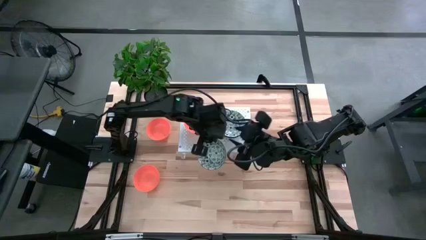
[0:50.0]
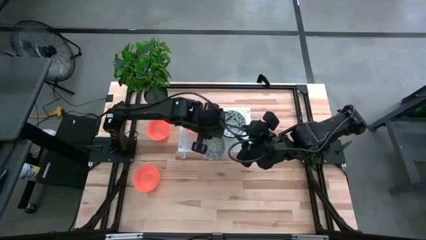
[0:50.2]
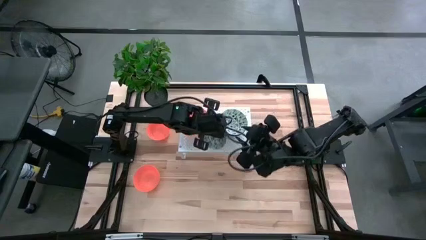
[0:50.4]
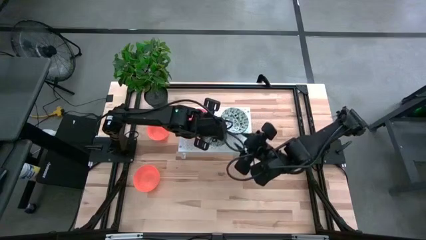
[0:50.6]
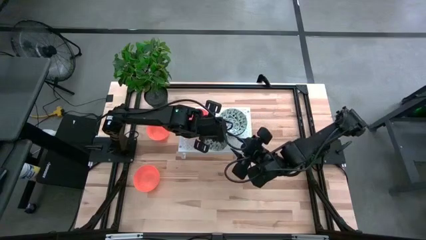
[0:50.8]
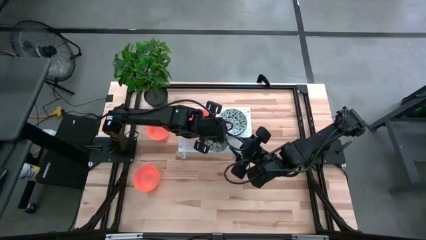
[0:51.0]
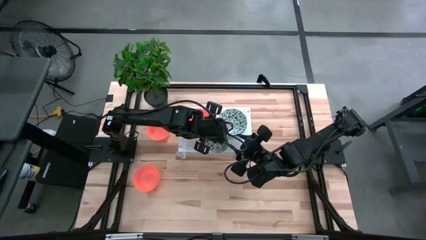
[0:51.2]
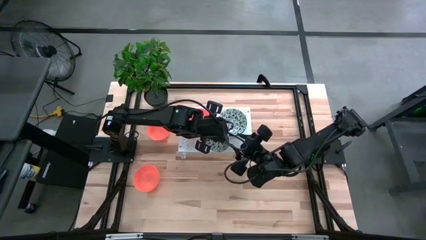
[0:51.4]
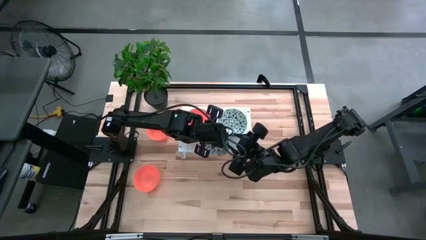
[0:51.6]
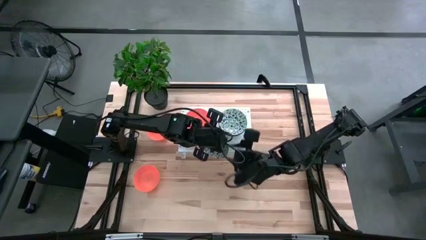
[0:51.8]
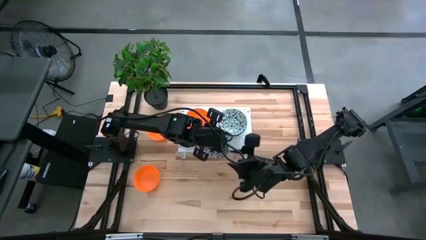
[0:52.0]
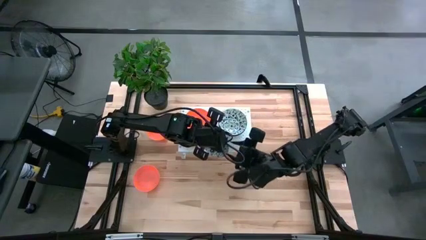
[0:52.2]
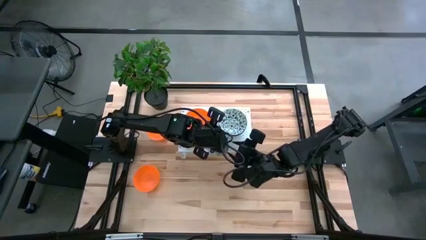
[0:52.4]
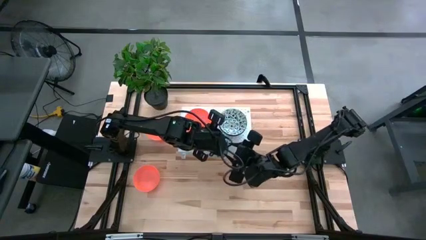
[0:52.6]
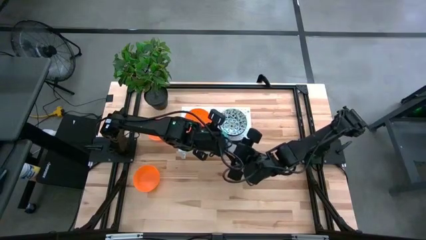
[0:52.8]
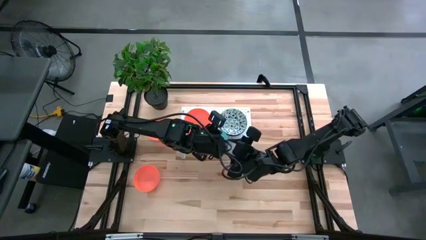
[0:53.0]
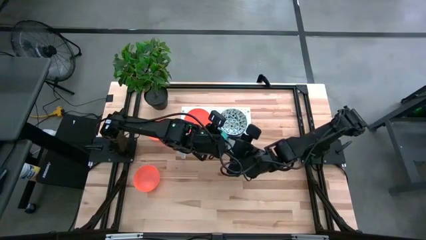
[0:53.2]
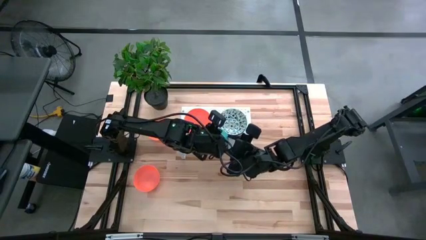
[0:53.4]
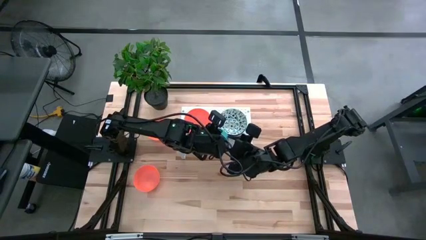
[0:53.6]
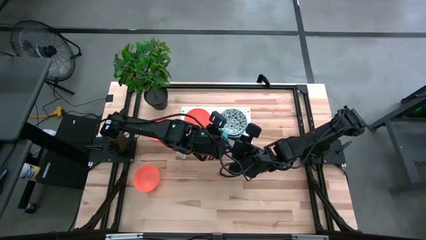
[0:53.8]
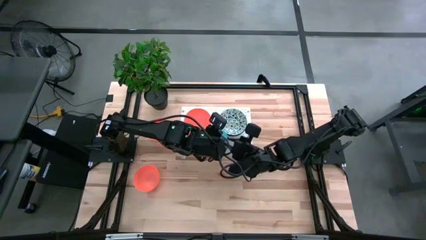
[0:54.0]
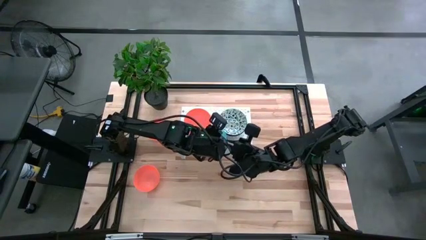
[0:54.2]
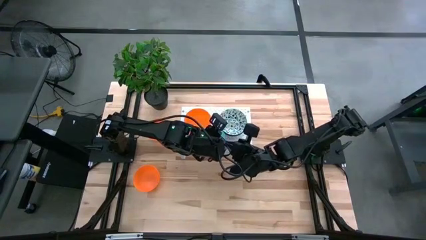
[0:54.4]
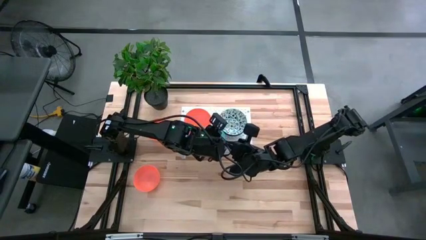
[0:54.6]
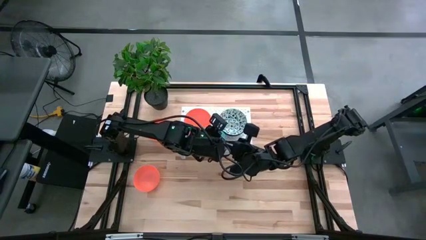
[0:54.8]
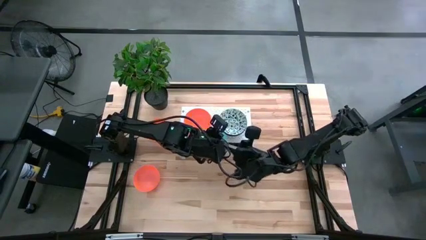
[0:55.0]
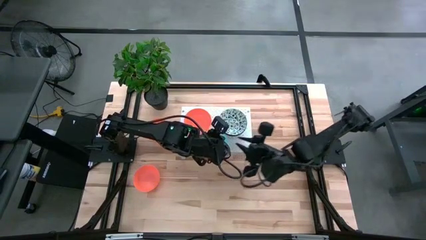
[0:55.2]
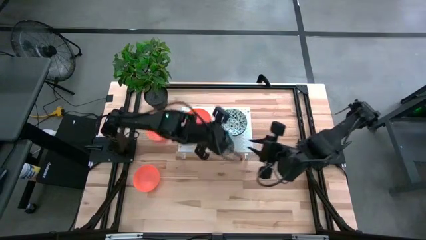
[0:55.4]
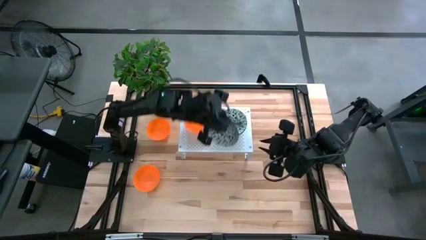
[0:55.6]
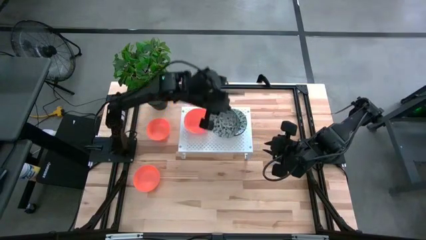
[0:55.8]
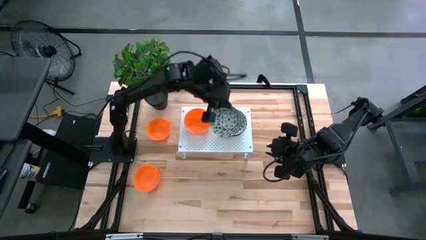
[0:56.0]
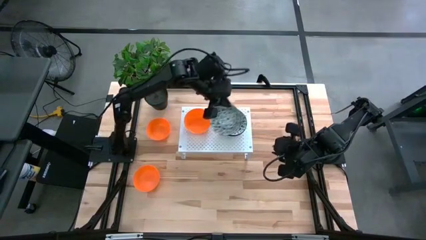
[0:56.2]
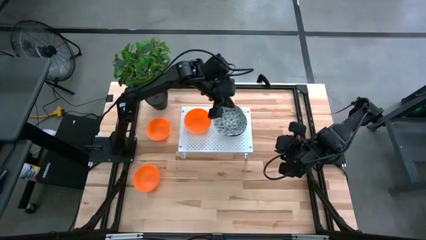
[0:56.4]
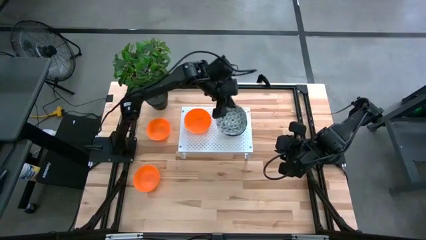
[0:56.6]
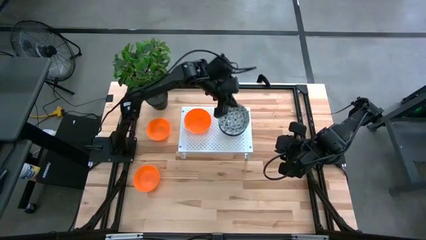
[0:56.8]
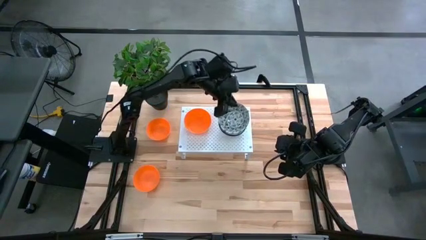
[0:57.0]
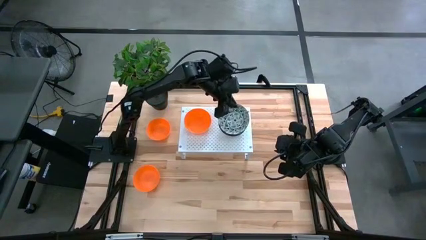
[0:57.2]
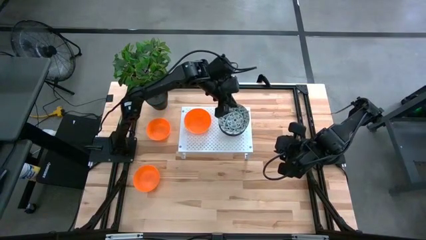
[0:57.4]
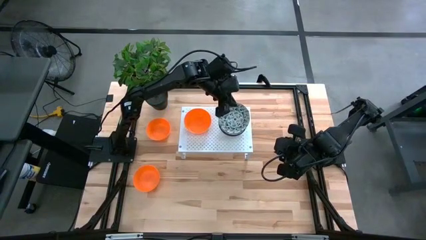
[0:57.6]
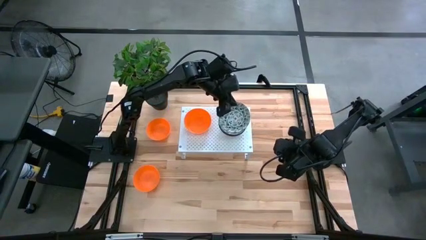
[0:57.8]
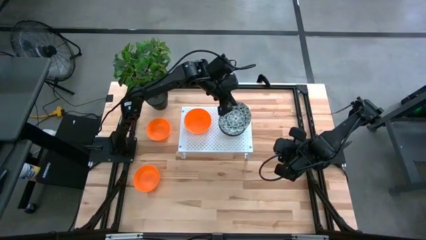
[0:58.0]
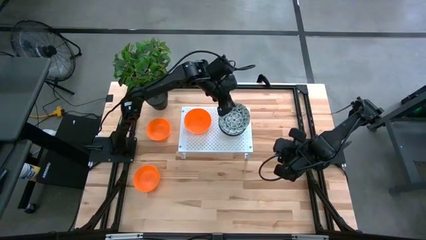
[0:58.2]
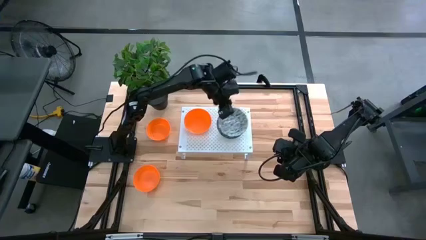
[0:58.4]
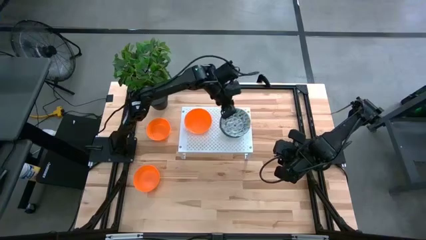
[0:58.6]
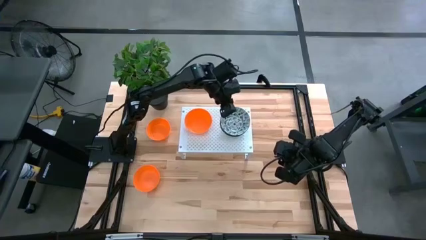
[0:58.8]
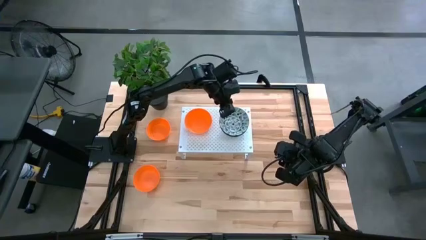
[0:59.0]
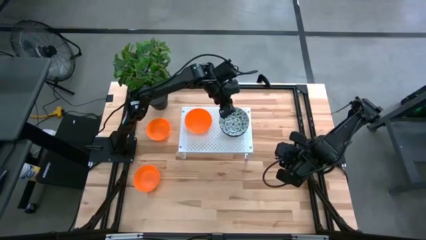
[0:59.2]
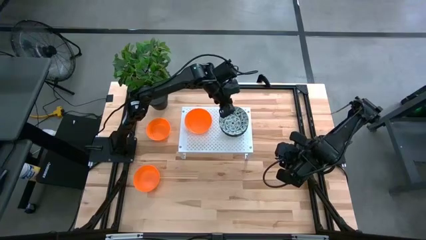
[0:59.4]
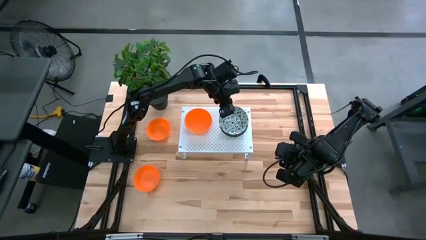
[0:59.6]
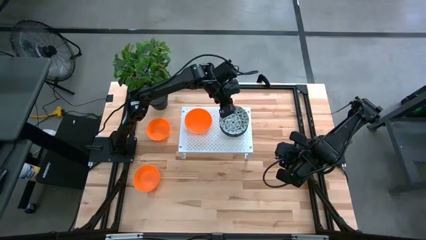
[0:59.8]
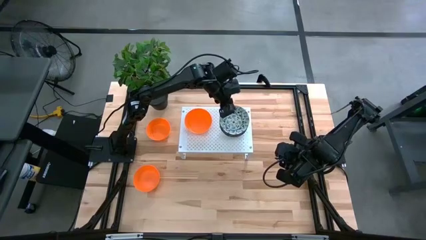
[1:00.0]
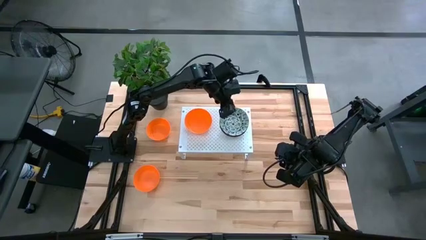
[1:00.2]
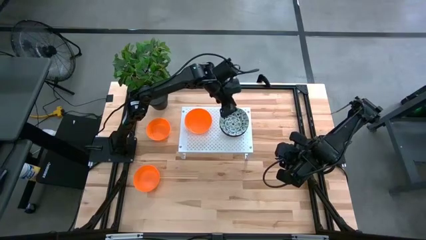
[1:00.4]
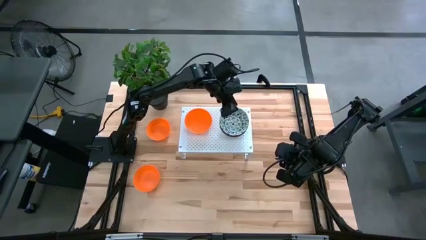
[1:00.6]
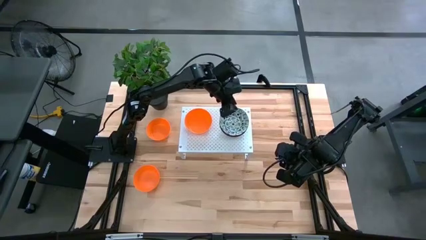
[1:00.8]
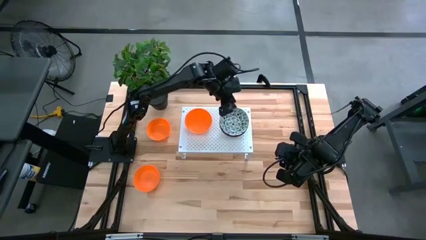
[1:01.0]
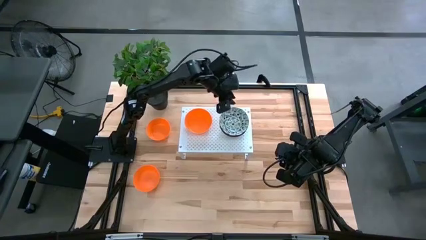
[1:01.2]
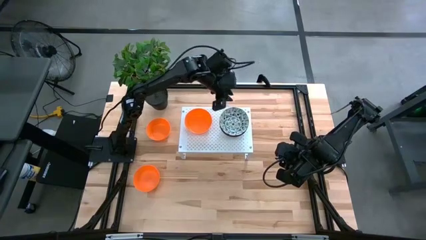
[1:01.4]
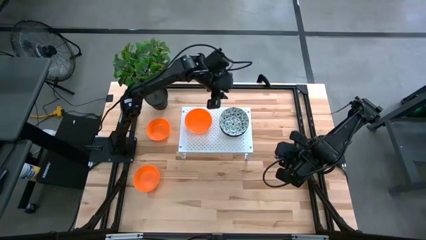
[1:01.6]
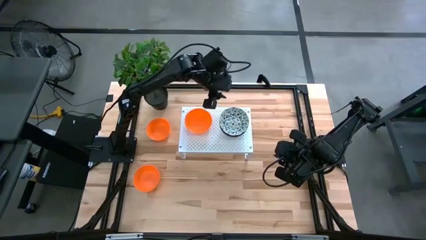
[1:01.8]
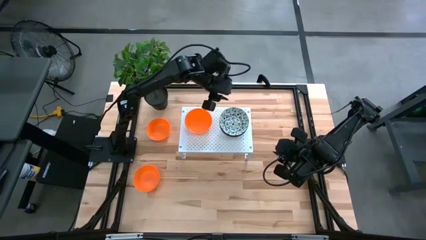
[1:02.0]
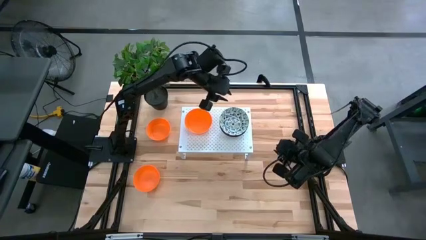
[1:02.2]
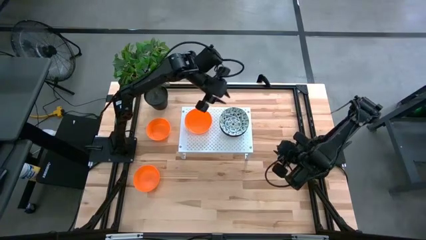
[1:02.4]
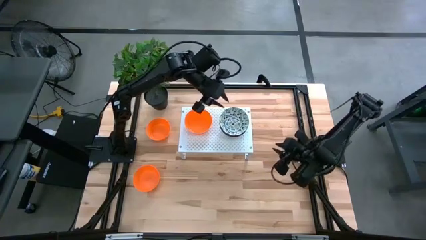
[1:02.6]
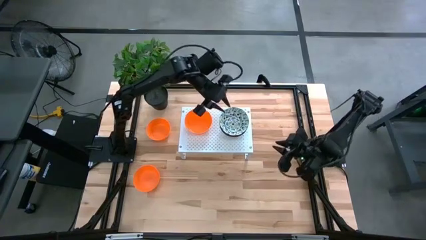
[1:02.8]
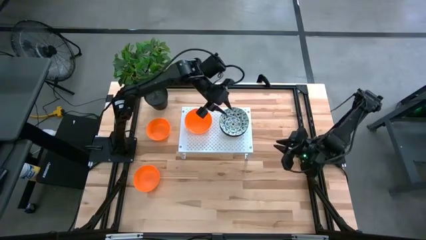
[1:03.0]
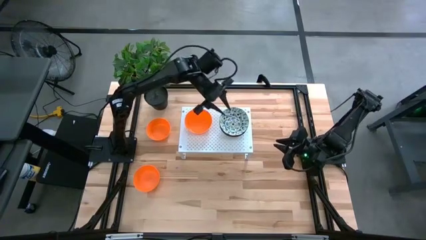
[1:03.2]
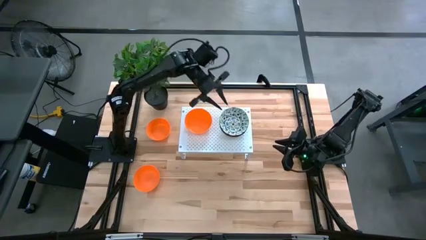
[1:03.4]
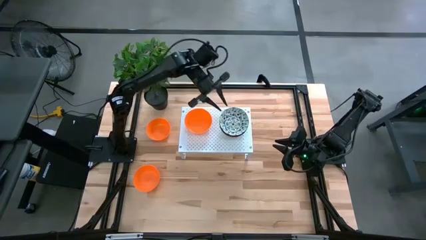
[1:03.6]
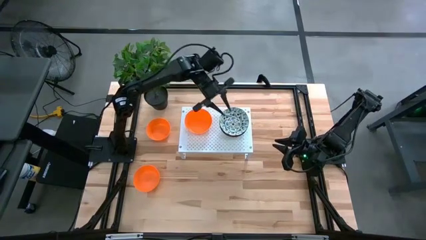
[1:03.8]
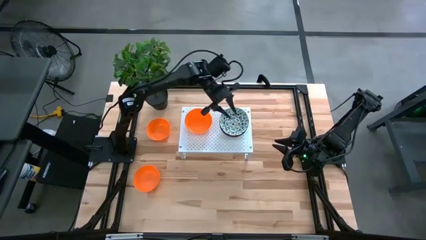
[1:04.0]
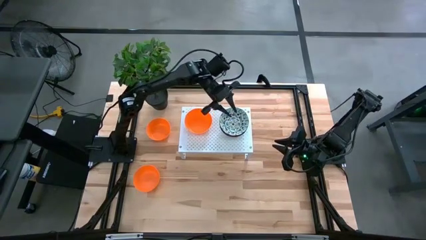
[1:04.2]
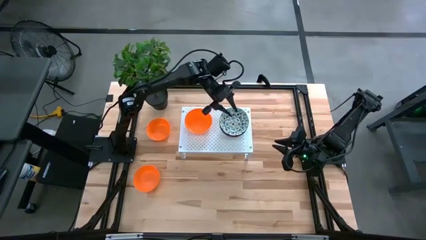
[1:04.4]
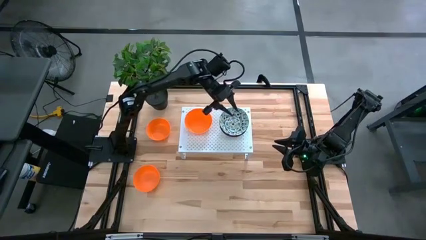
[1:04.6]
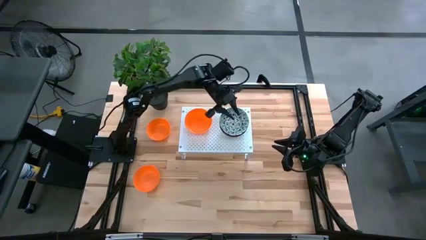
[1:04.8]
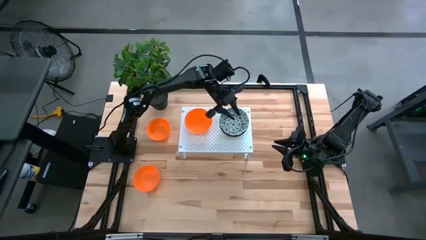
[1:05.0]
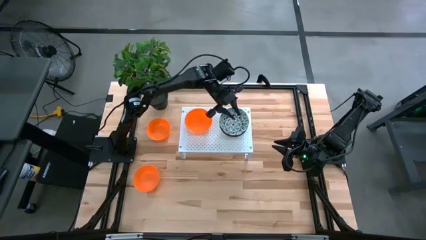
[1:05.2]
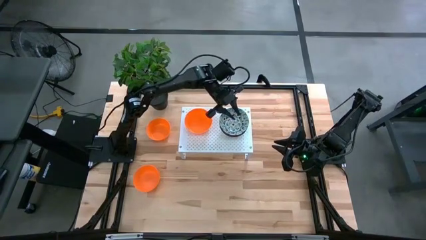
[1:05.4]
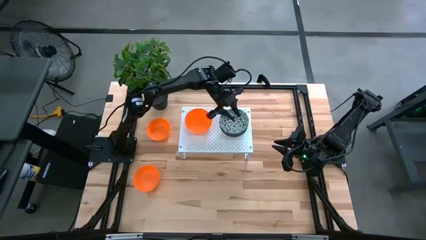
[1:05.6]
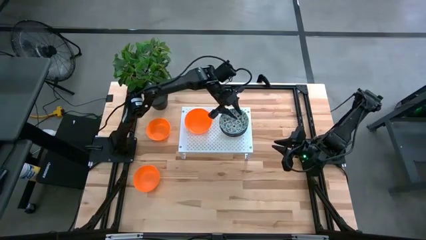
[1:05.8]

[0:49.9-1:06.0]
Task: Pick & Place Mini bowls
Stack the blue patterned bowl on the blue patterned bowls on the shelf
